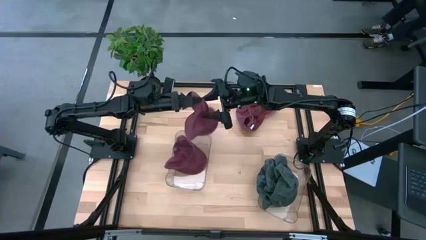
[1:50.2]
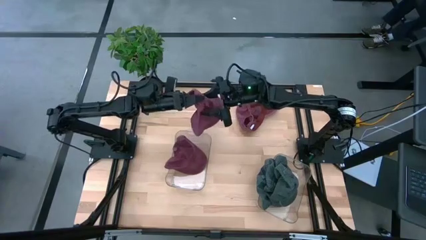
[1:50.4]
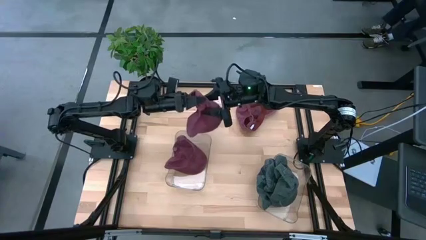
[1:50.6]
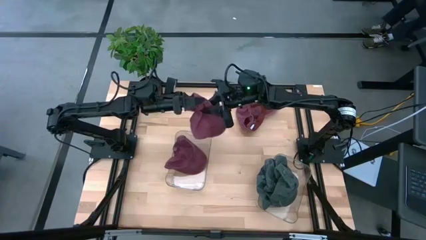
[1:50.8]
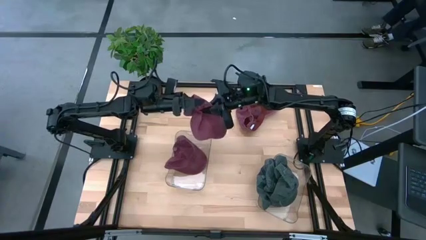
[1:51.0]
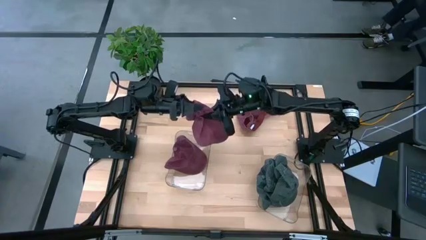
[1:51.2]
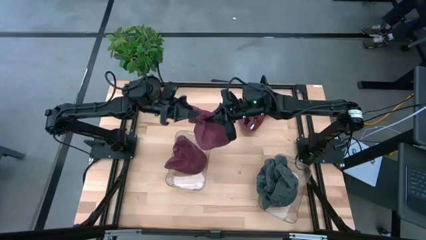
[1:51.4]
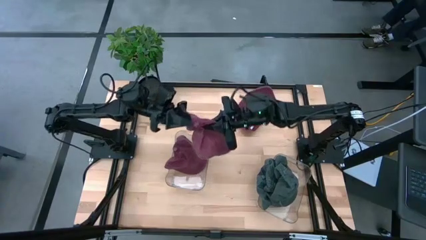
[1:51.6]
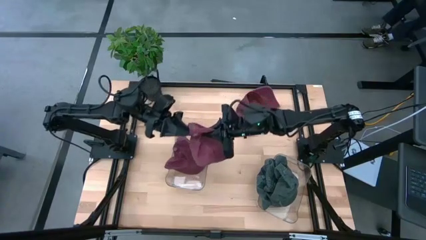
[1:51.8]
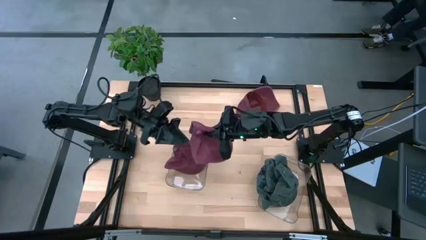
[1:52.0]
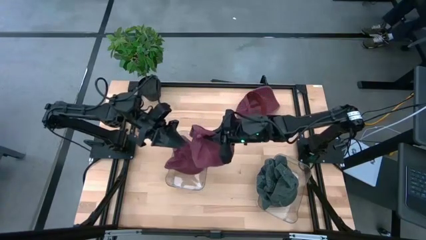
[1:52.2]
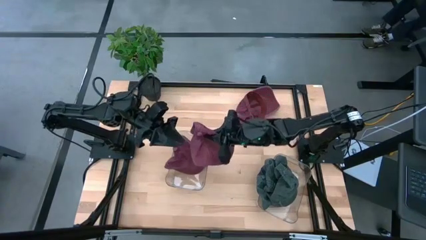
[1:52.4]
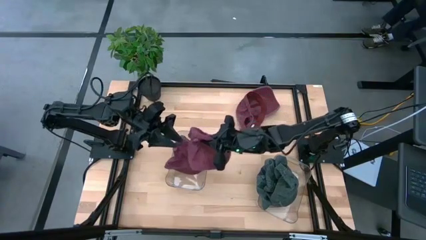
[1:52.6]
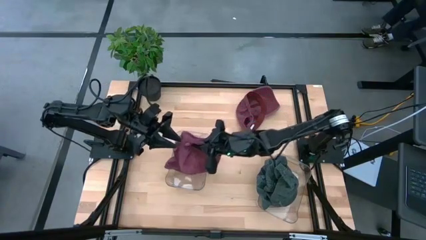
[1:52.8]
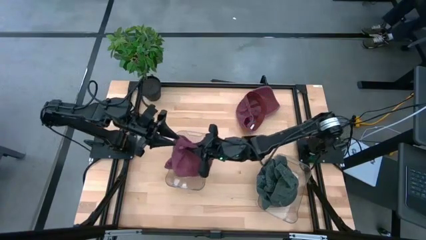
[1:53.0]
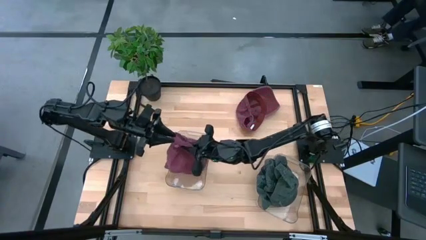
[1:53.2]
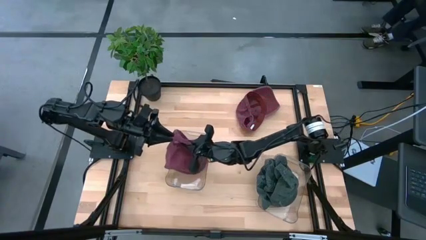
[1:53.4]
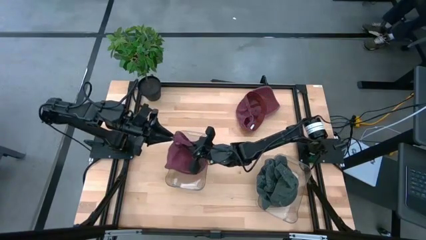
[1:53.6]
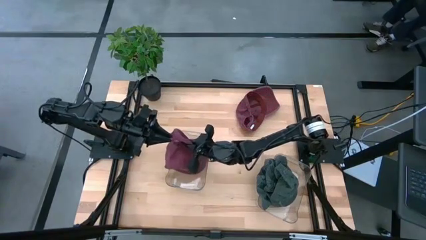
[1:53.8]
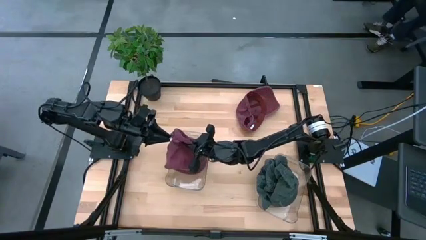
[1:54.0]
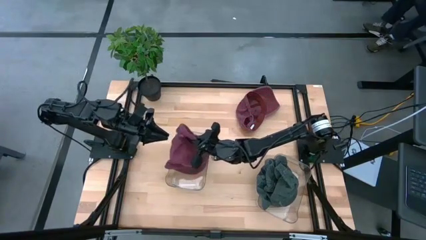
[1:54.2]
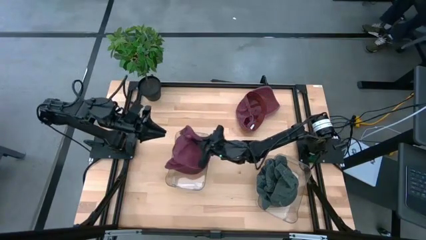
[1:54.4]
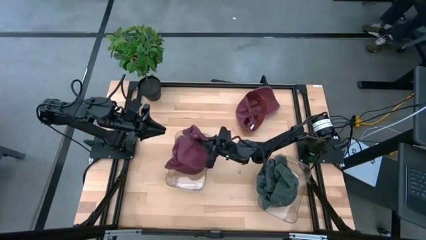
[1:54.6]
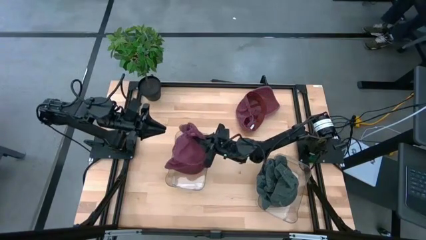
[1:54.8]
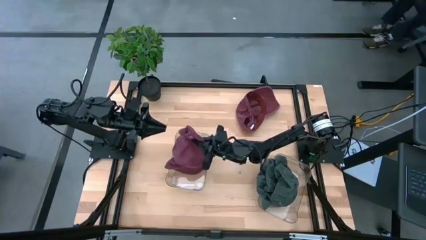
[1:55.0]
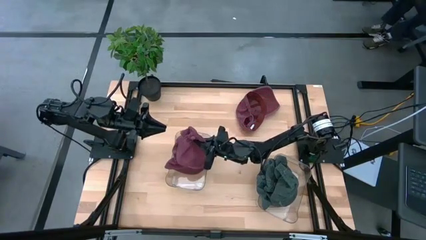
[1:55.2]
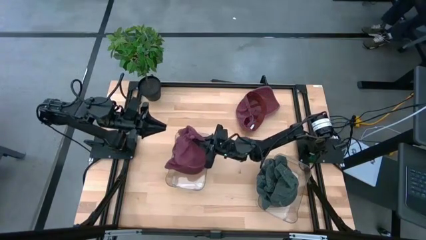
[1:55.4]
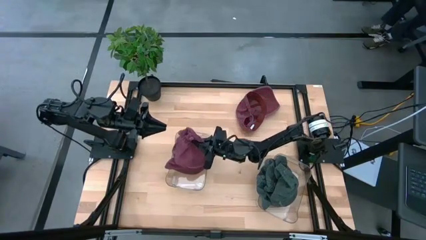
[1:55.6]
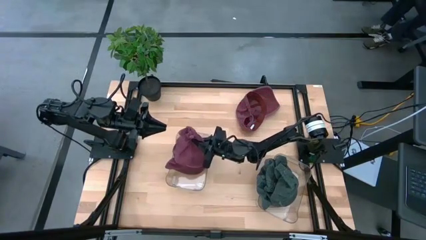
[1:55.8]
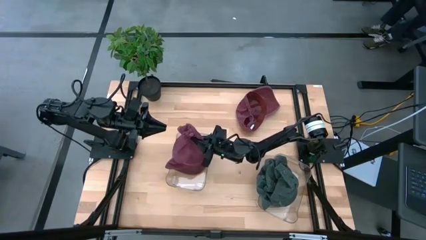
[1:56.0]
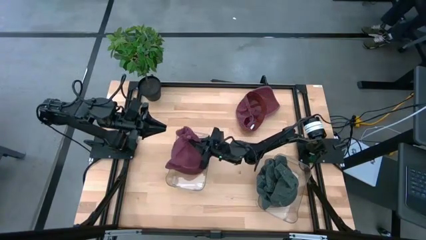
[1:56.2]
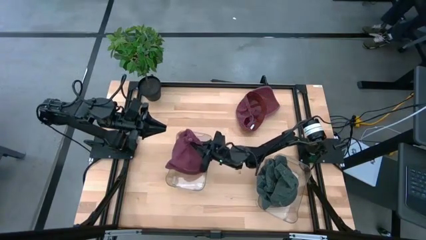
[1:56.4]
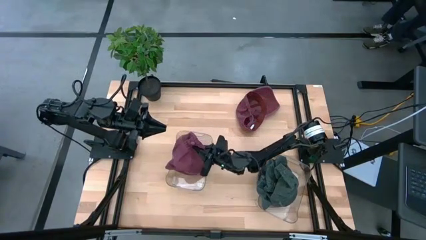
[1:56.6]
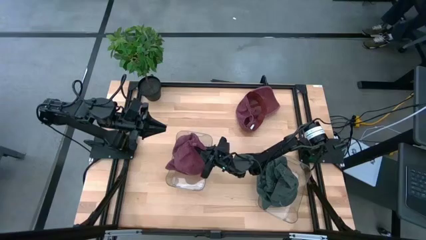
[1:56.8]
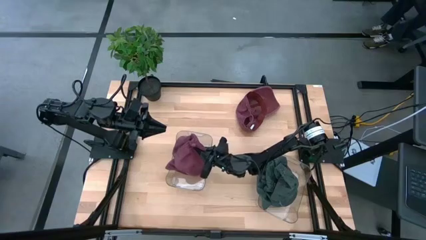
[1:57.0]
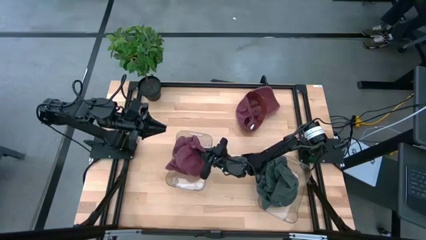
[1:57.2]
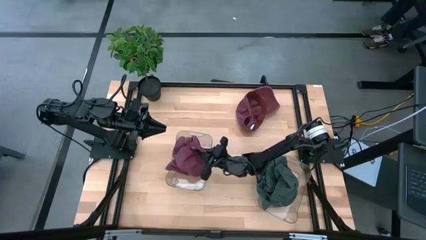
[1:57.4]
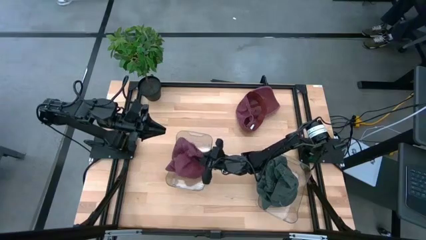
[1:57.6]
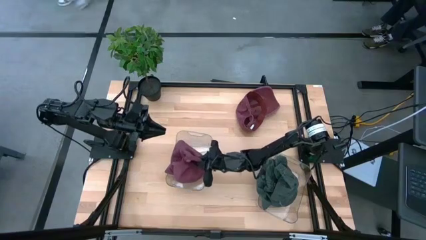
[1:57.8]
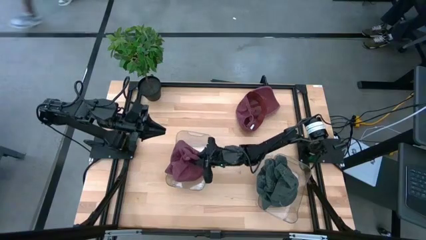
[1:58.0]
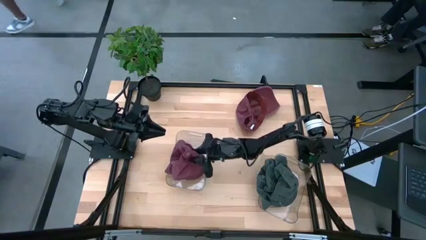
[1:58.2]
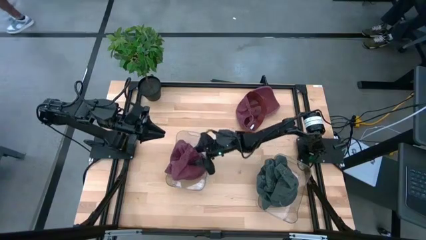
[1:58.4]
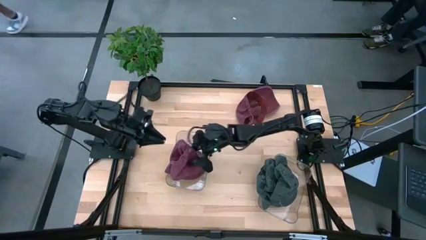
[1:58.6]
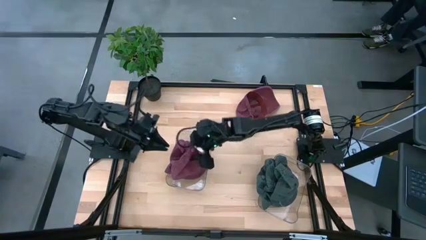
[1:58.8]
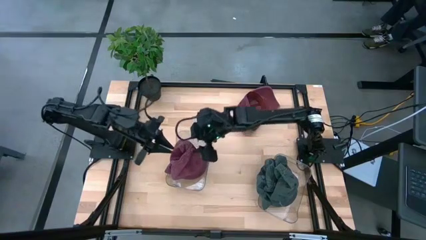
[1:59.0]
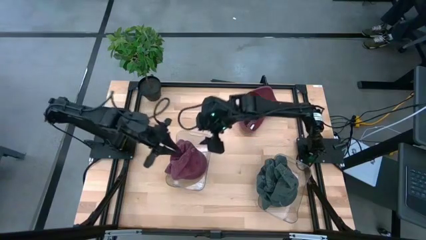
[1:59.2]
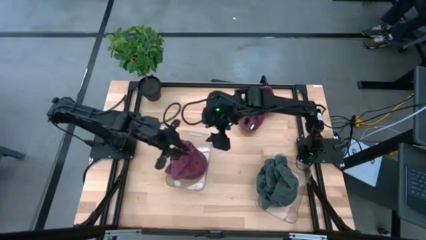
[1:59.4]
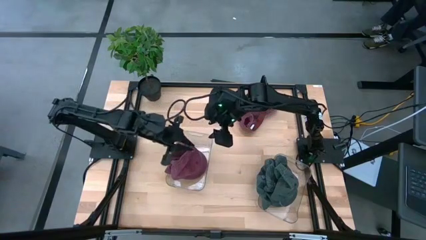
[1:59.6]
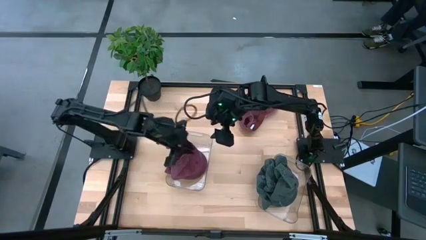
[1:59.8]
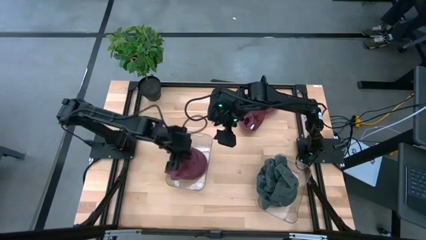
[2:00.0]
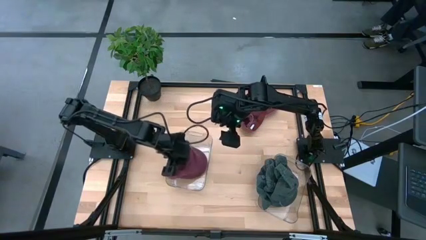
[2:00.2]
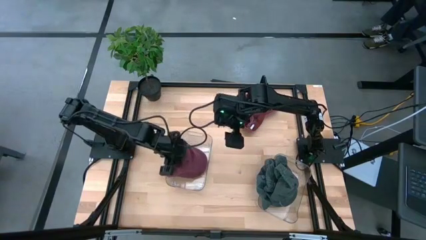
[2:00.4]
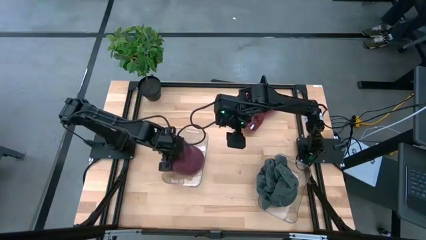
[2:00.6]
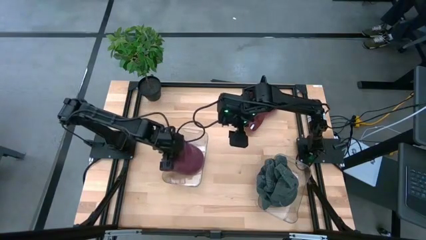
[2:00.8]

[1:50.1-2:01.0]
Task: Pick & Place hat
Put the left red cap into the left transparent bin

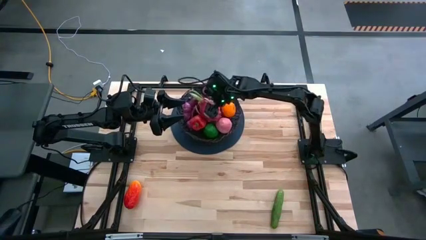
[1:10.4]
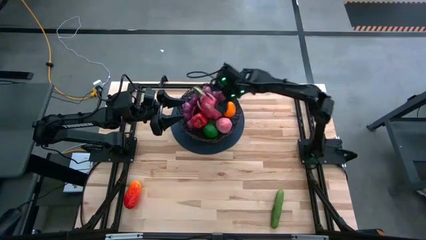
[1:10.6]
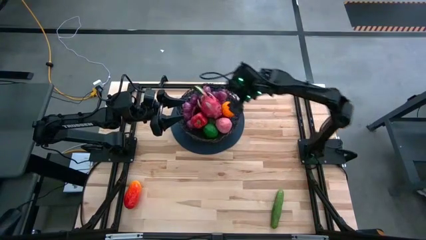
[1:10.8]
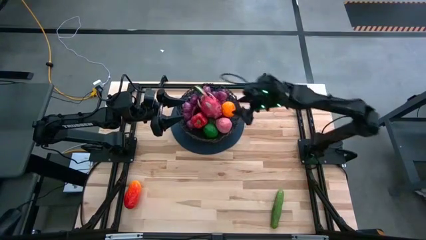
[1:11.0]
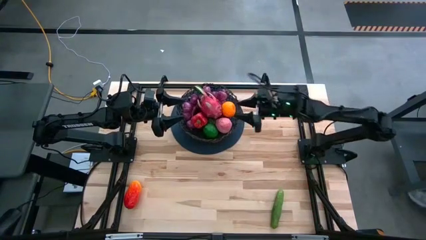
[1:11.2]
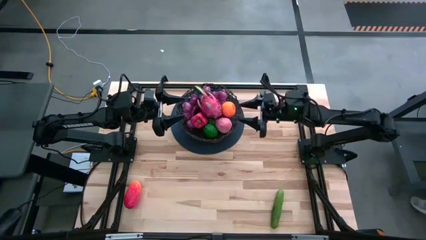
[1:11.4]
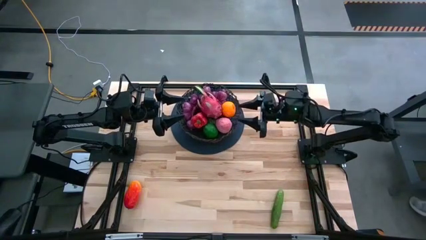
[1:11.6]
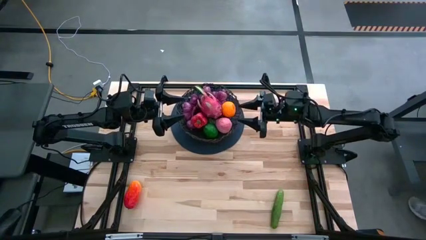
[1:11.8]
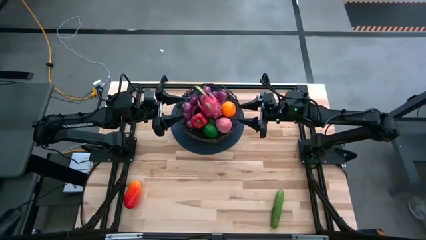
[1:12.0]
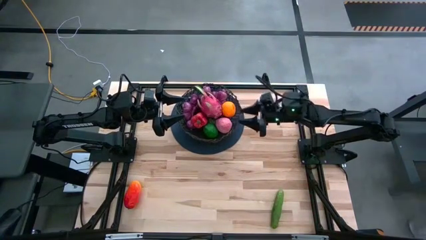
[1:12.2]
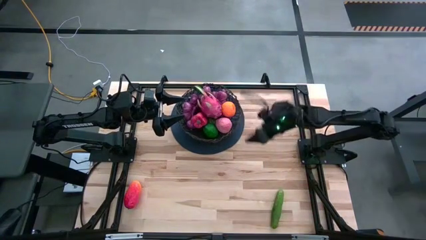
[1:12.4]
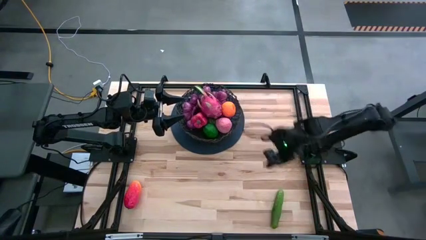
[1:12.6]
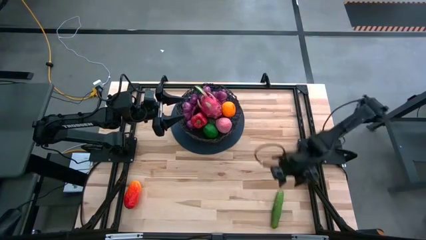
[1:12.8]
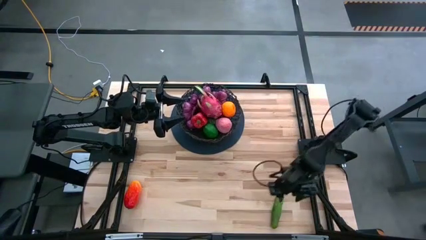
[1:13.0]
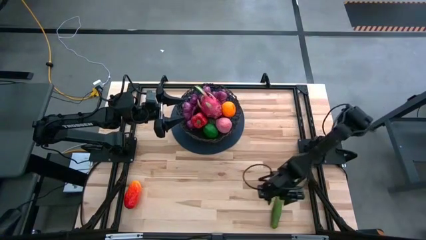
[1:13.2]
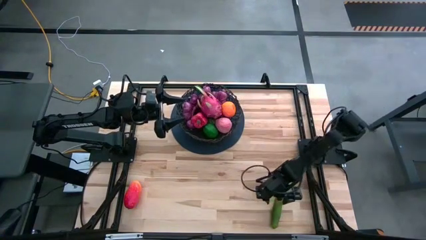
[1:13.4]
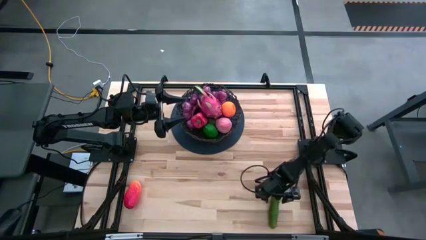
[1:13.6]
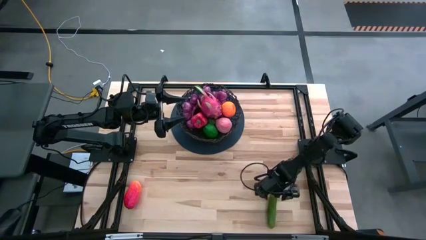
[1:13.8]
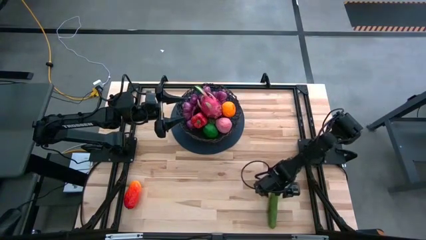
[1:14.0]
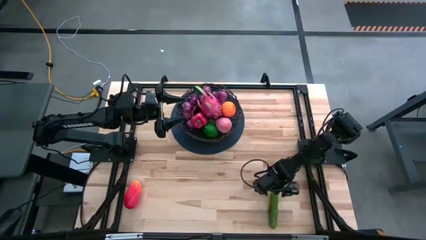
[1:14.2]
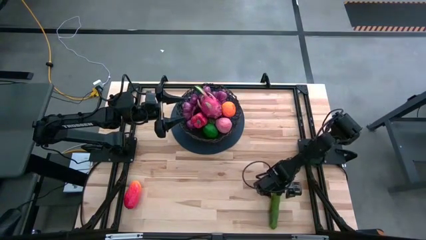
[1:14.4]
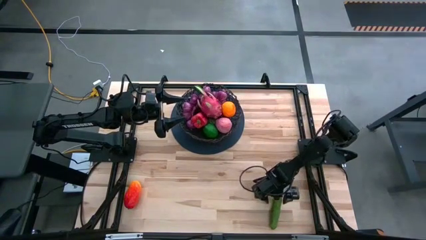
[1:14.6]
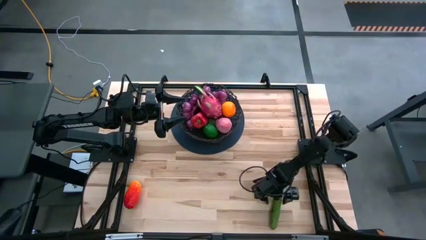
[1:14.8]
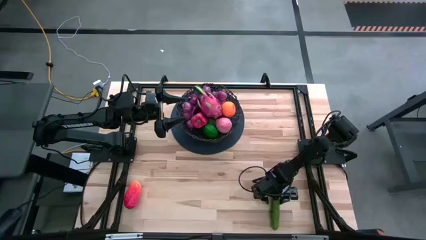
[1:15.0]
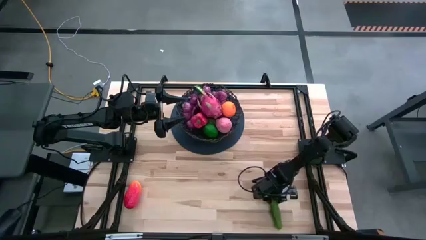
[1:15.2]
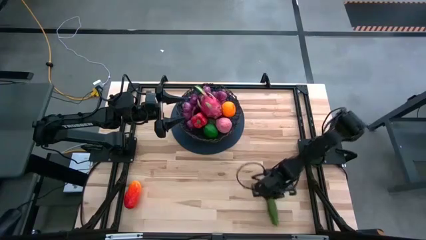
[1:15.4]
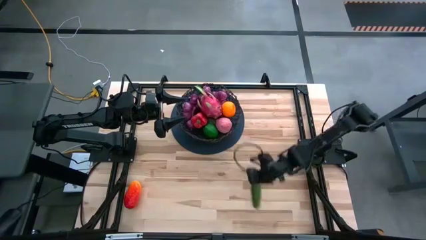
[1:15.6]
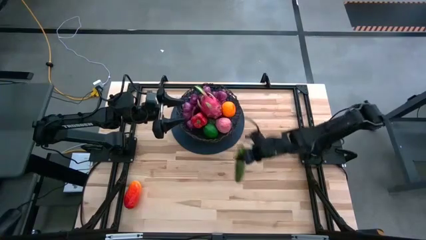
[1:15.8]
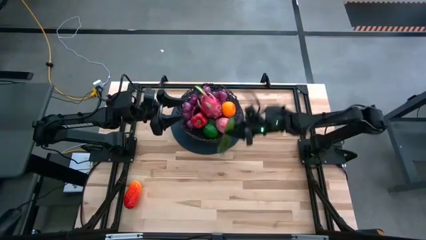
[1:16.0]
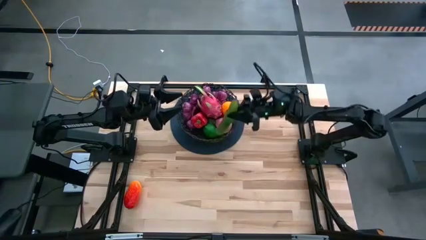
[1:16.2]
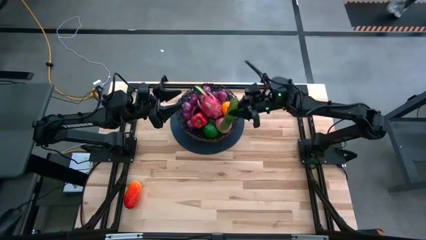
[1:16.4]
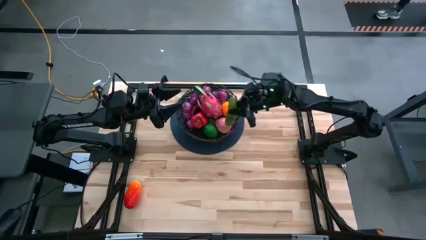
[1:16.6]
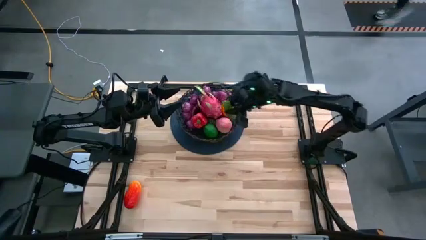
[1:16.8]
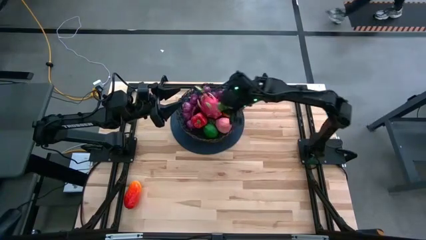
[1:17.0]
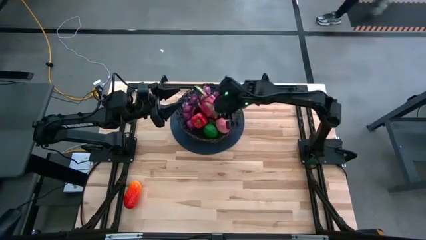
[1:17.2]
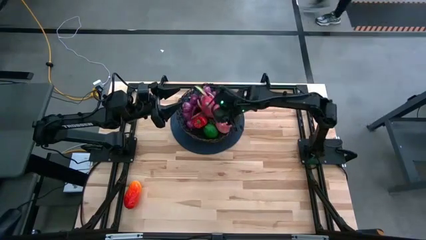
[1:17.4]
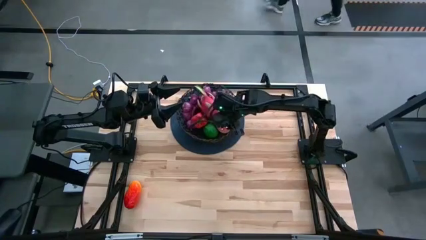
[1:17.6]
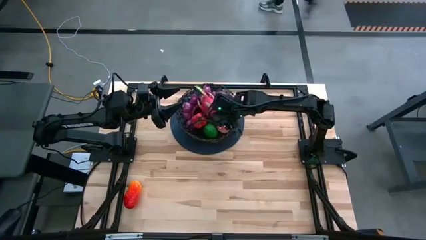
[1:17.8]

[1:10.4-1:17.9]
Task: Build produce basket
Put the cucumber into the wire basket
